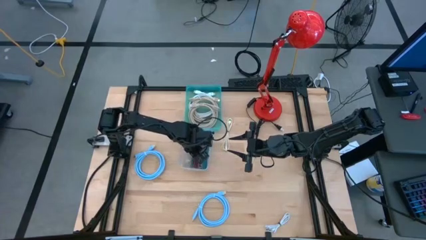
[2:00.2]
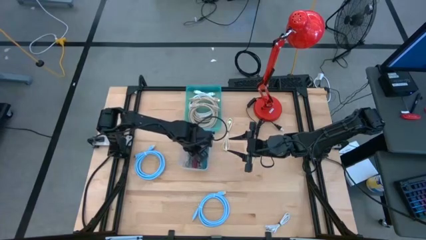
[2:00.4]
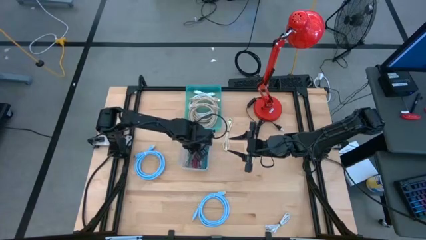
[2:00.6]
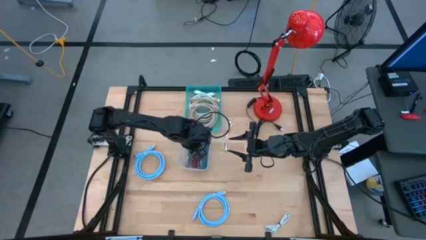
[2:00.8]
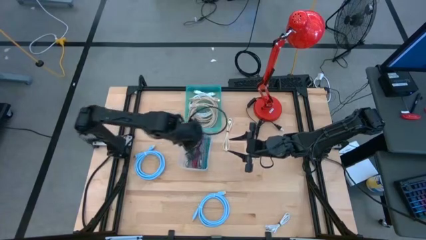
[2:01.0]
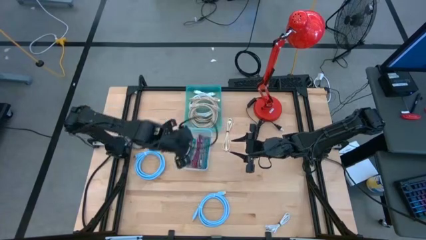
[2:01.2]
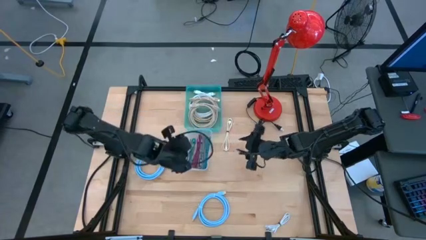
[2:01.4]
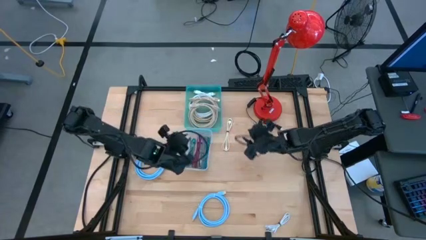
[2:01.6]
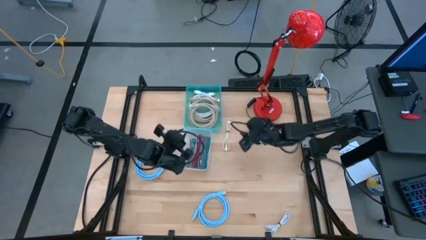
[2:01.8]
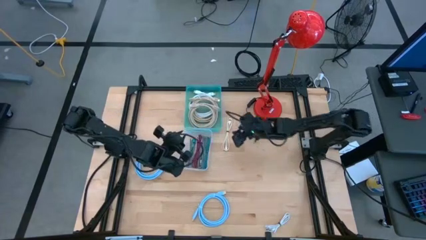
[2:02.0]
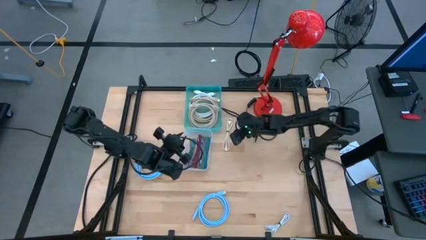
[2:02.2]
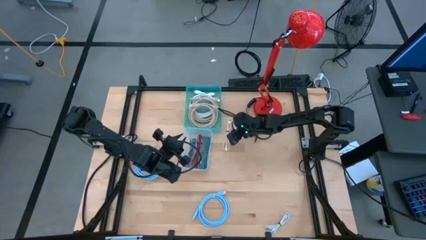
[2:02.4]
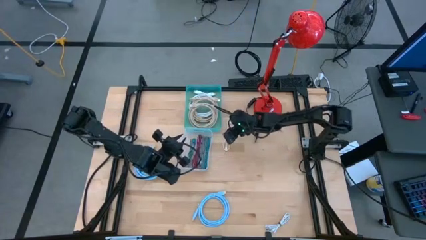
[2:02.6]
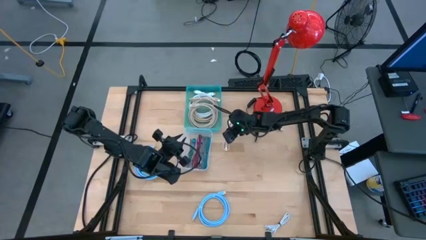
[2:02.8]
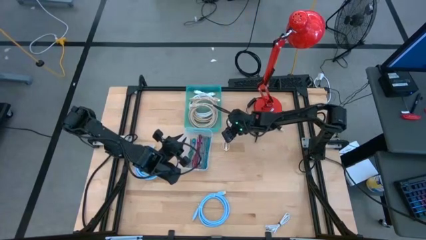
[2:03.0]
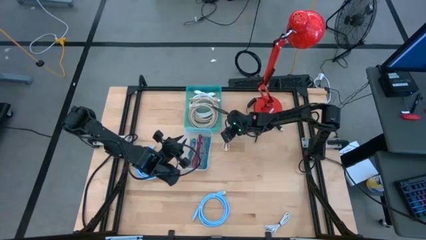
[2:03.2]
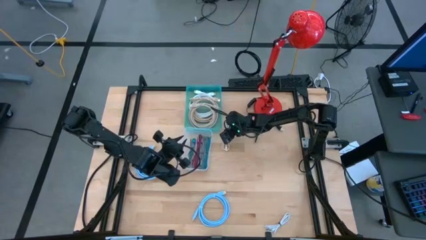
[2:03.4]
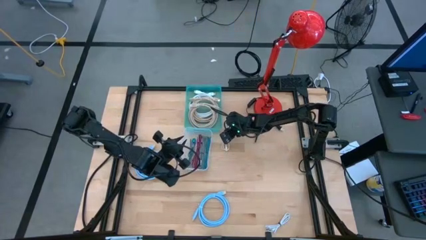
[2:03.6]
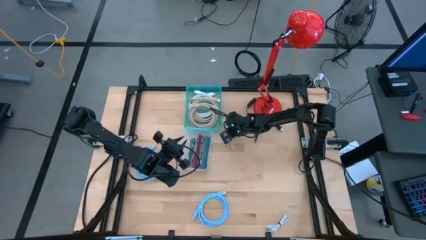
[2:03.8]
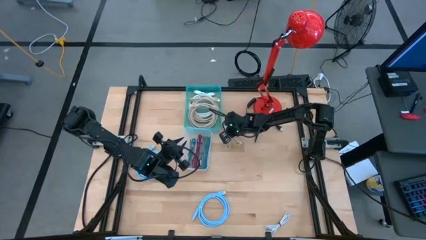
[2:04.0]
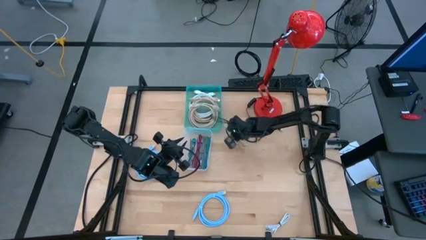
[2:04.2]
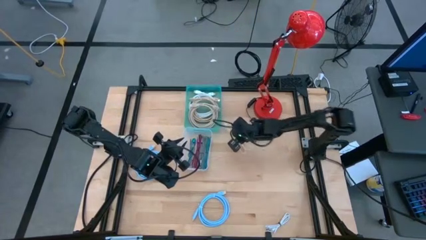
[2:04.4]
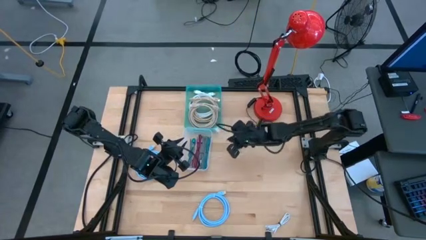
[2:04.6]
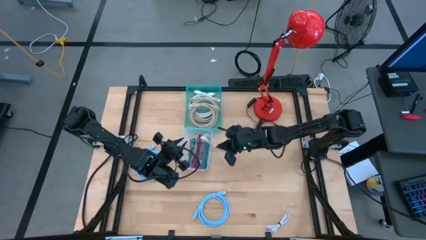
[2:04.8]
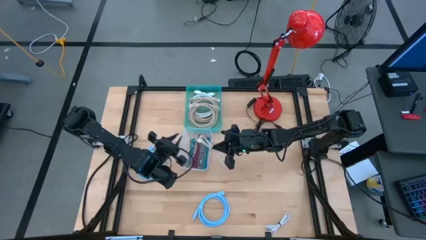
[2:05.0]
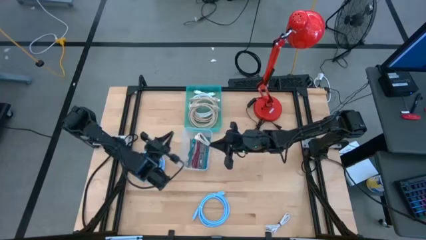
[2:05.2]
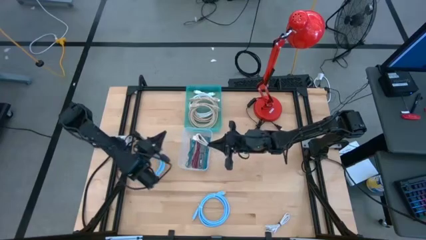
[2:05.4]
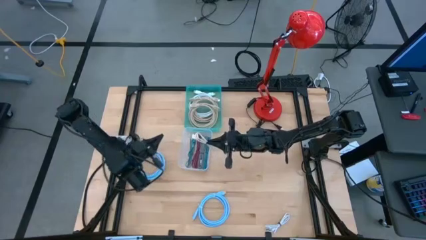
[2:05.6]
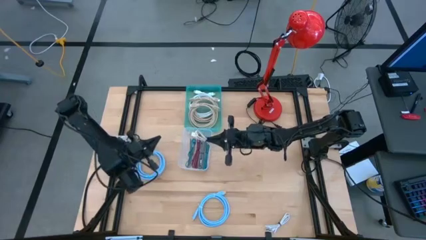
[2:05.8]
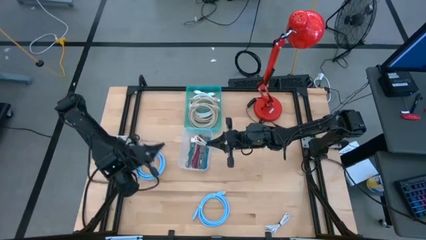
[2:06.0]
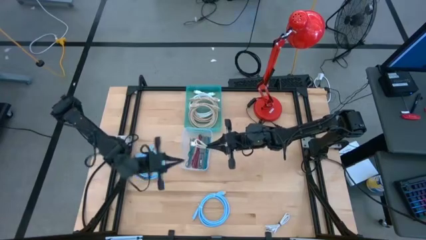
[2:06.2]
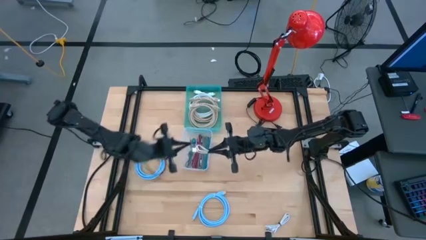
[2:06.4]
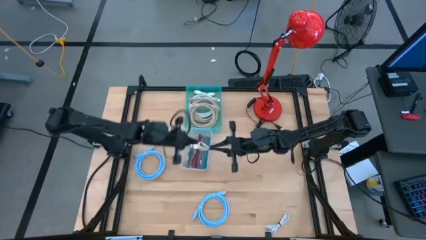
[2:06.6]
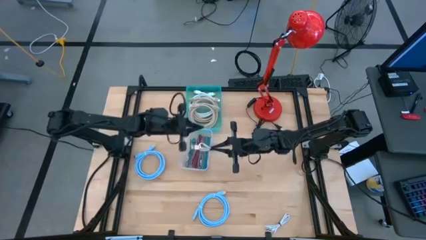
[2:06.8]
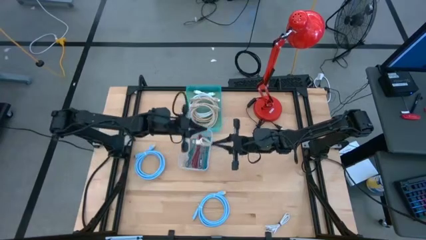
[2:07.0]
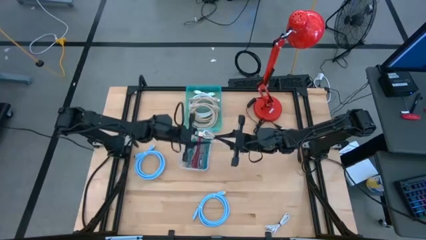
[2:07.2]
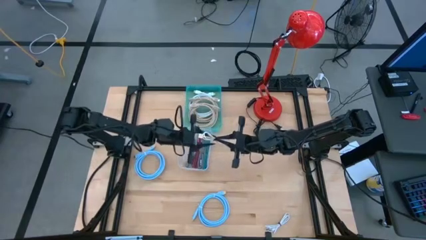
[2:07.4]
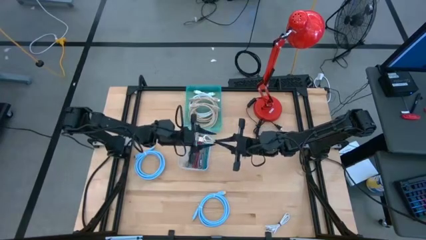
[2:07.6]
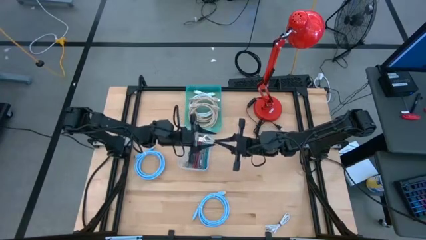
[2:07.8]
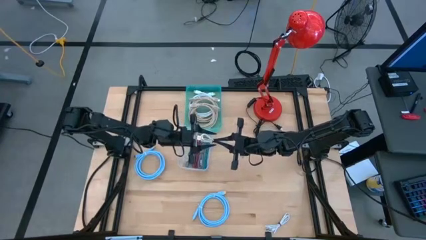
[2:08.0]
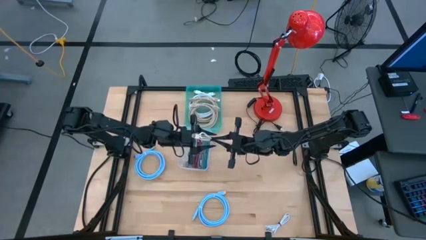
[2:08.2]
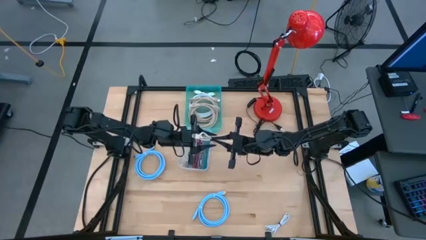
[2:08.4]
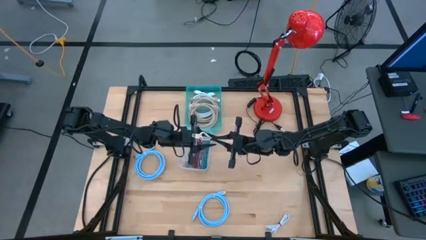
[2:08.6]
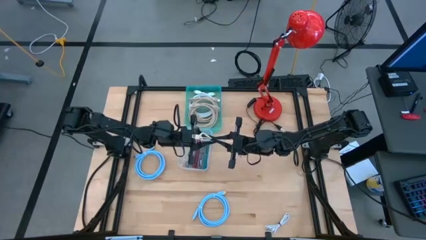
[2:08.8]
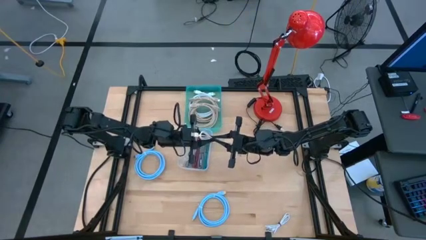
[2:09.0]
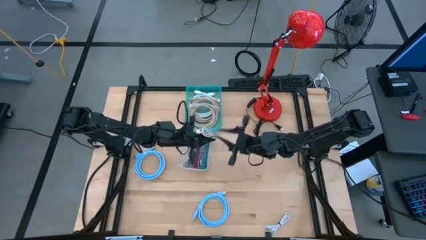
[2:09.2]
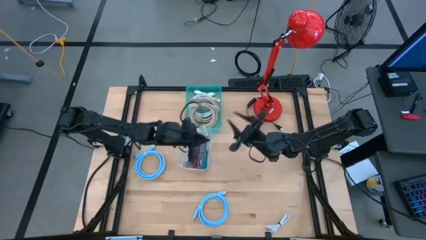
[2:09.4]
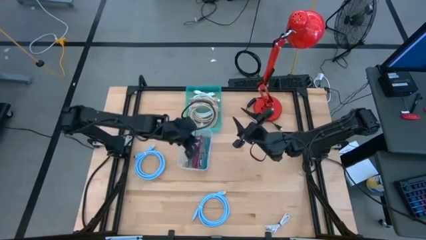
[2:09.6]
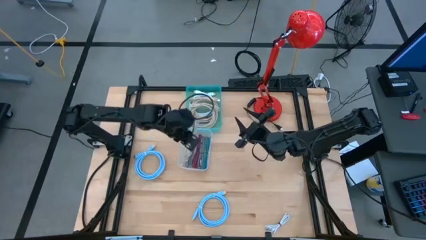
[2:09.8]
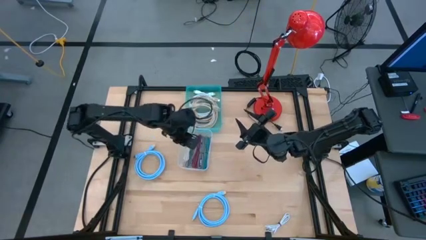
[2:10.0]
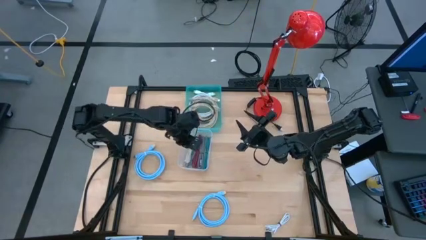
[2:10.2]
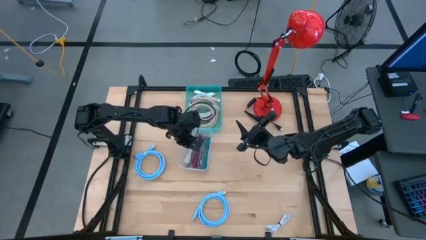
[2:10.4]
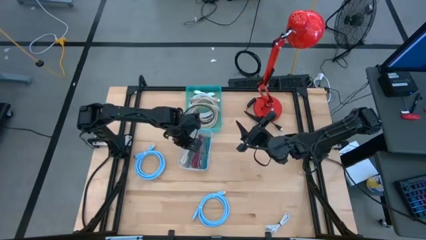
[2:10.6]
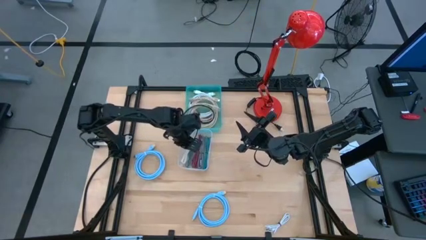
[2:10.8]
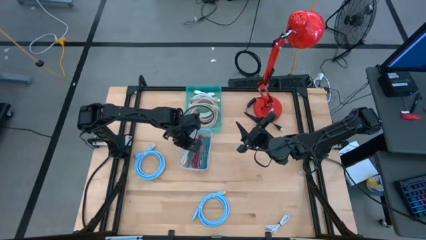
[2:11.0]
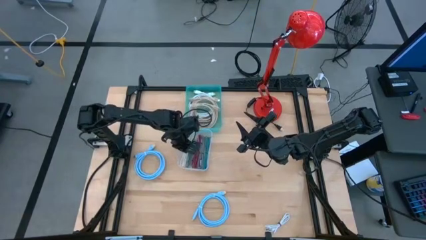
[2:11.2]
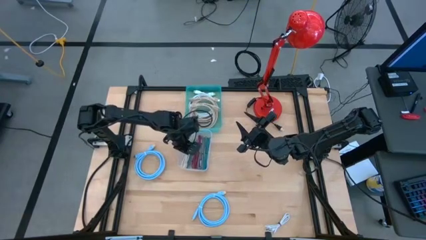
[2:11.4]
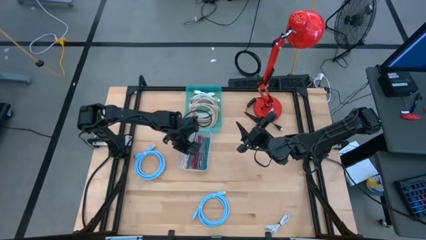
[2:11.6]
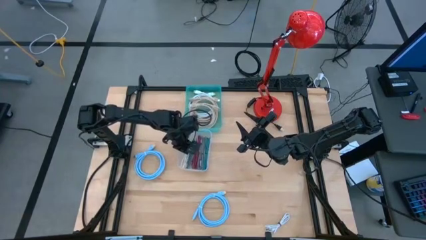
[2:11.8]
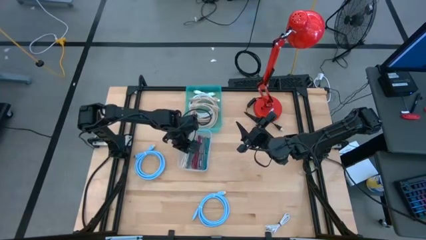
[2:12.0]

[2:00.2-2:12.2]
Task: Pick & Place USB Port
Put the light brown tied USB cable into the blue bin

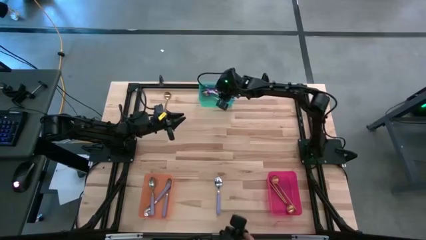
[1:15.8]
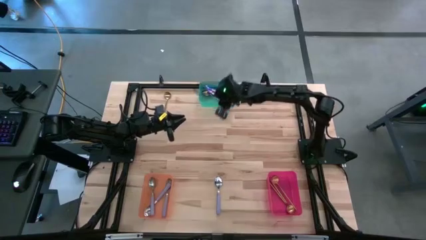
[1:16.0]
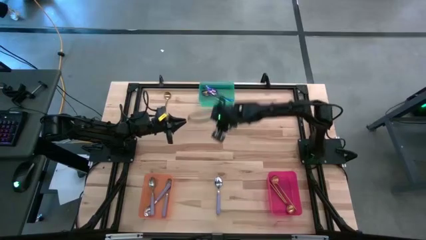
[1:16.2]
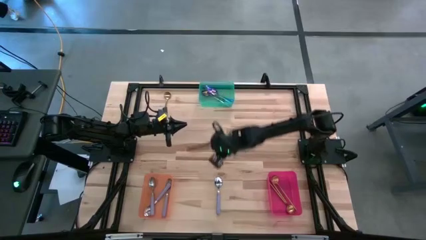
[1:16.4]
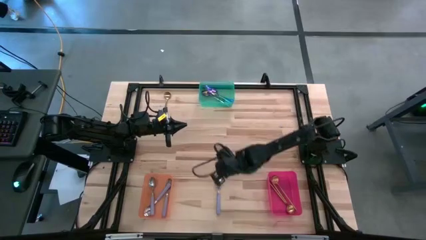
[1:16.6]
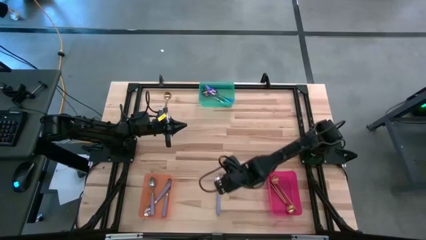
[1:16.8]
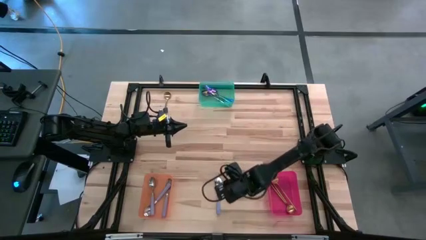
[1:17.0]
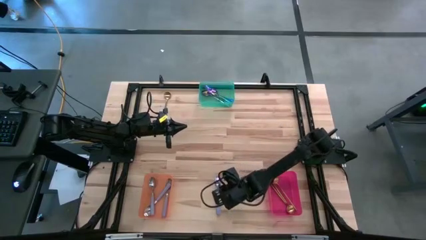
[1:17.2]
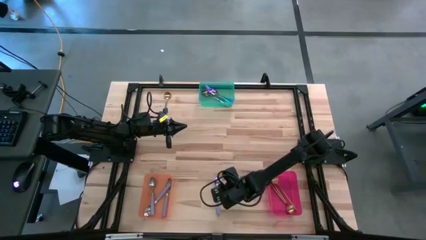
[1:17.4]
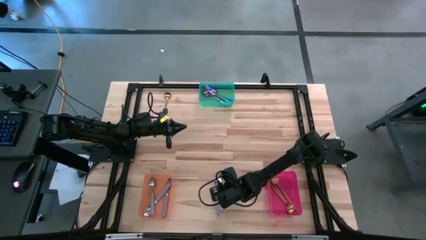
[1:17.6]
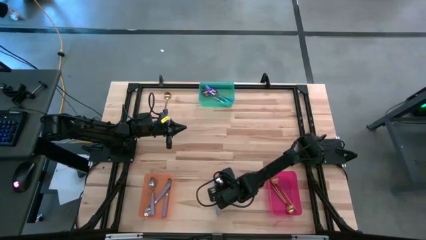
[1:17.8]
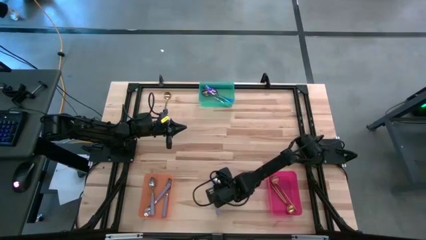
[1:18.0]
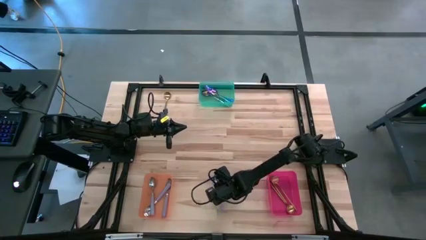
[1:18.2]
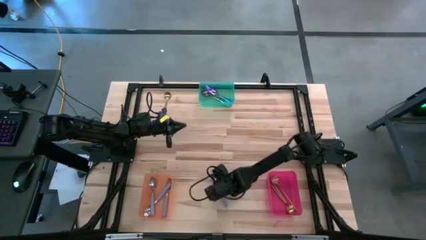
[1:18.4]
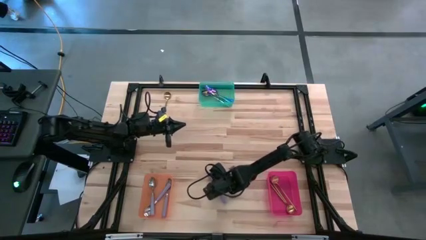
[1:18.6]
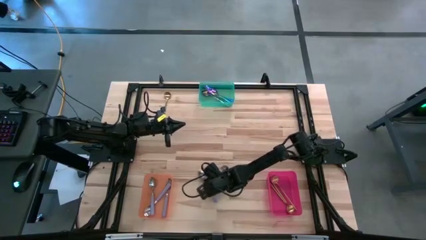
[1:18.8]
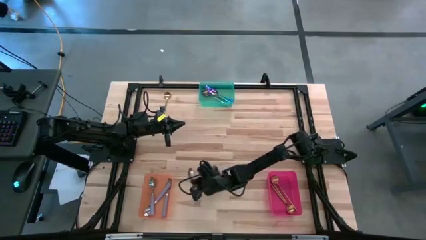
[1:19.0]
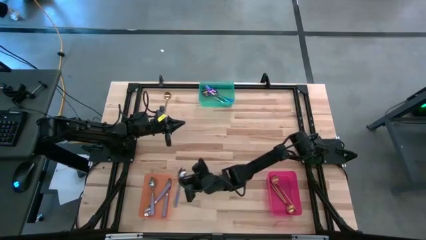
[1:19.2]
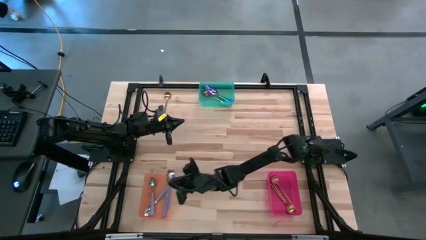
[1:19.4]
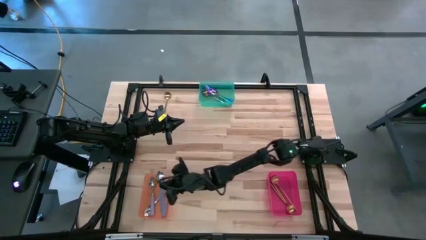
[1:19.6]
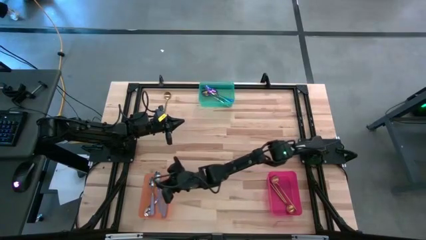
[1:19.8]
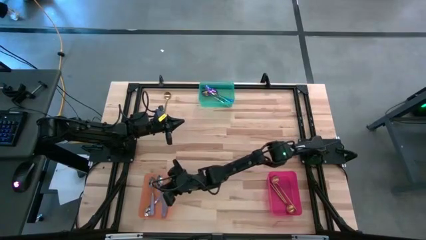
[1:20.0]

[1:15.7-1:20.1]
Task: Sort silverware by color (type)
Put the purple spoon into the orange bin
